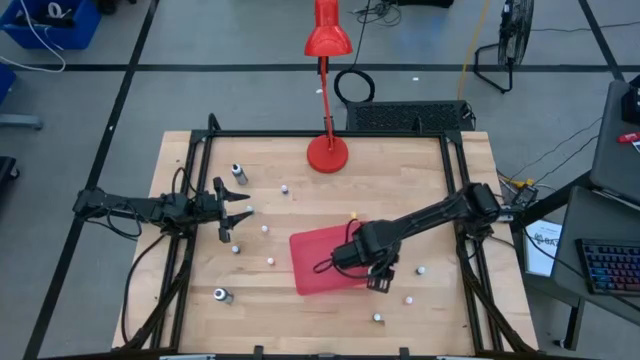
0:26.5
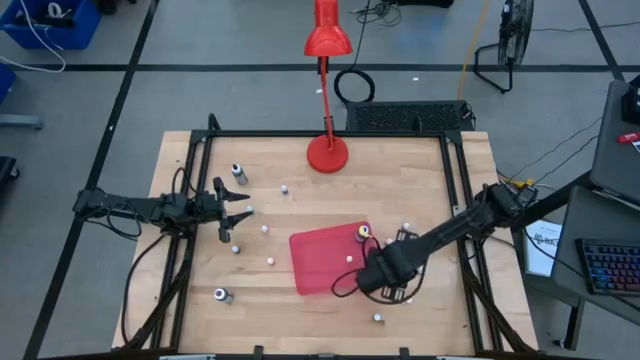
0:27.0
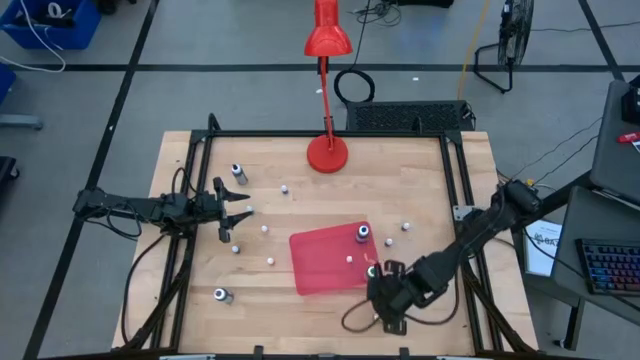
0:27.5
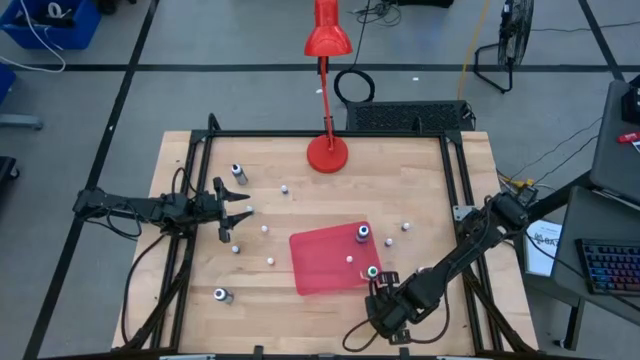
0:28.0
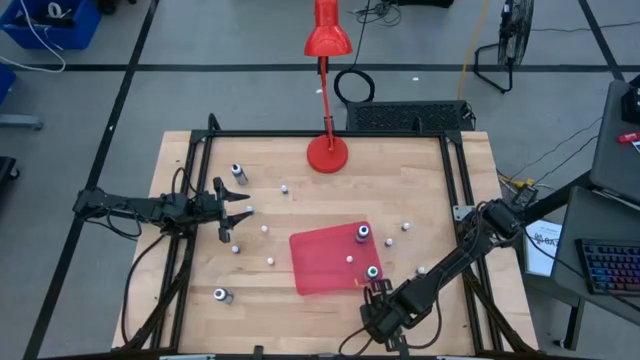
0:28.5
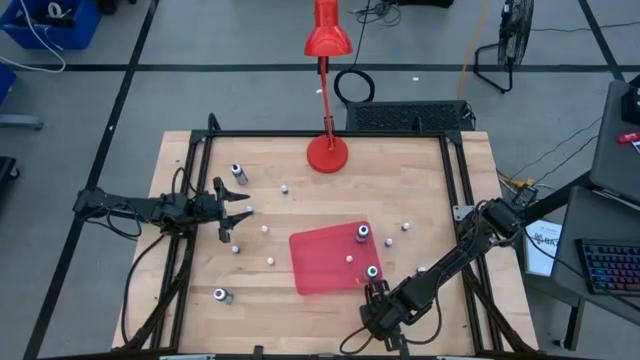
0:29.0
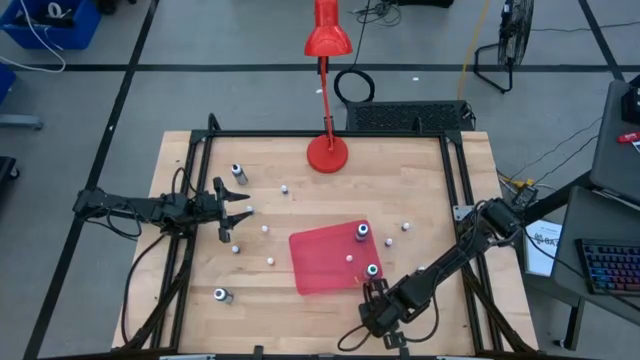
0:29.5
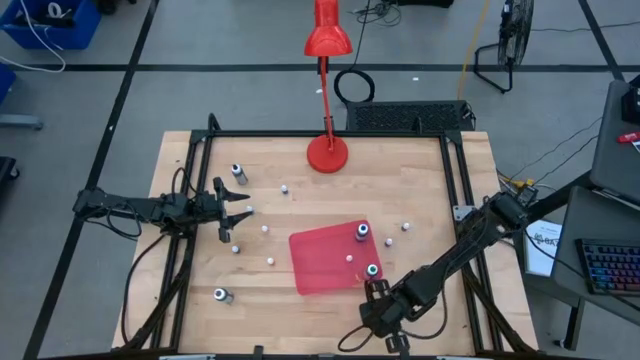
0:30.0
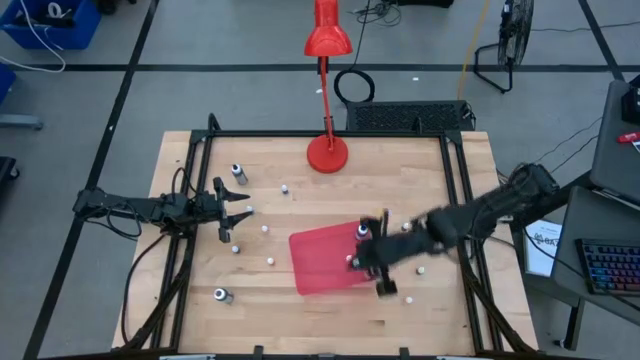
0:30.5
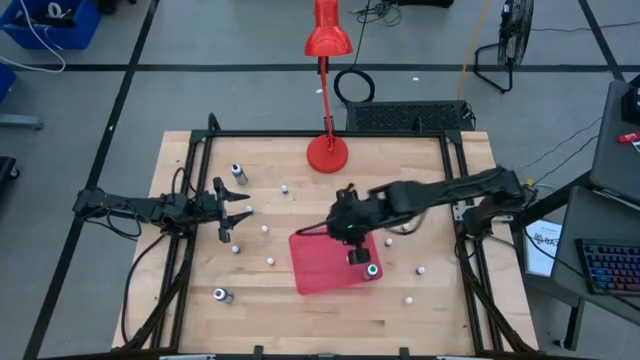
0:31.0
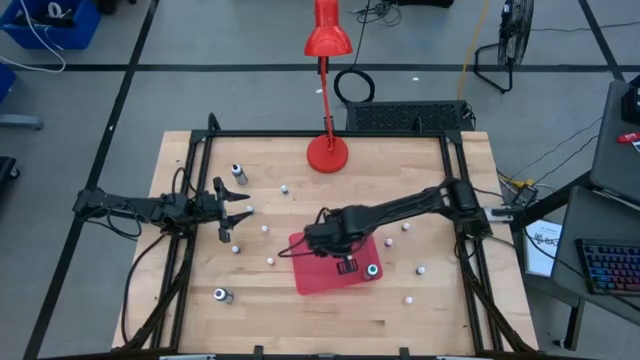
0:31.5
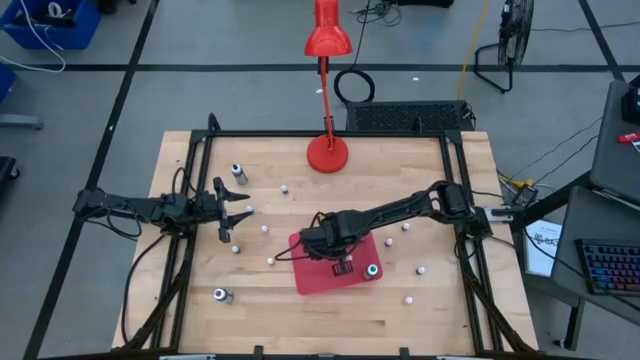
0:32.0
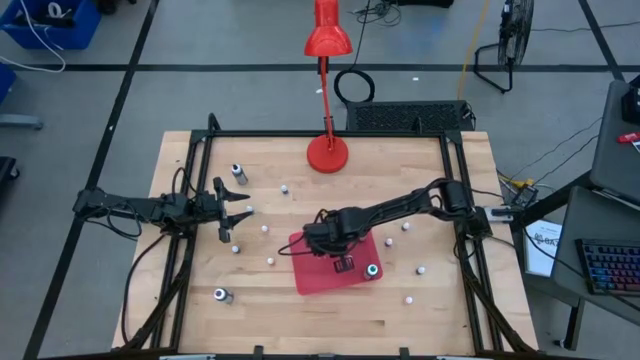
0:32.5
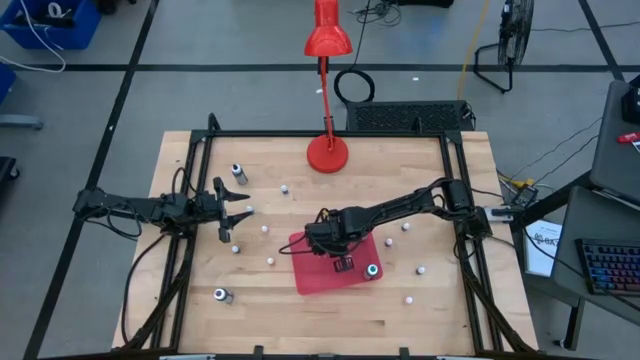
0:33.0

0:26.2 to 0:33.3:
Task: Pick & Place food coloring
Put the small blue food coloring bottle into the pink bin

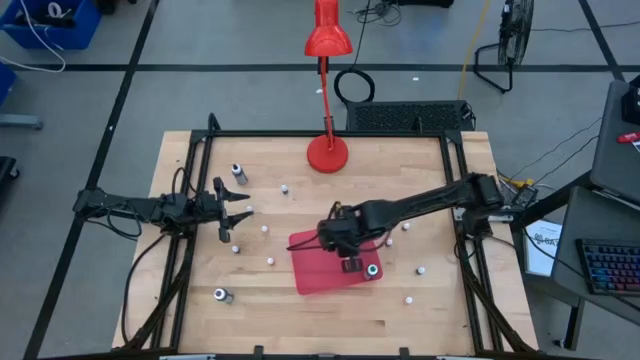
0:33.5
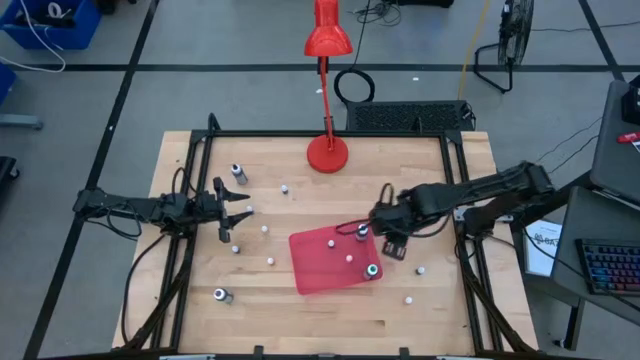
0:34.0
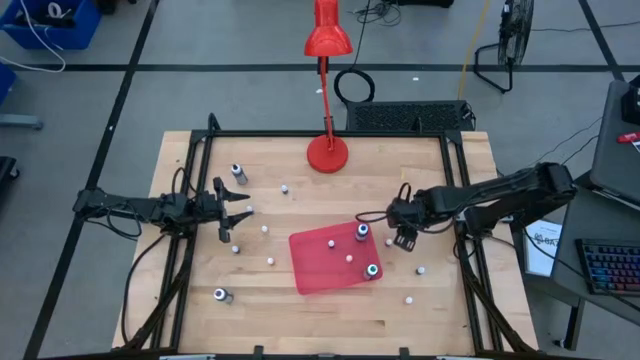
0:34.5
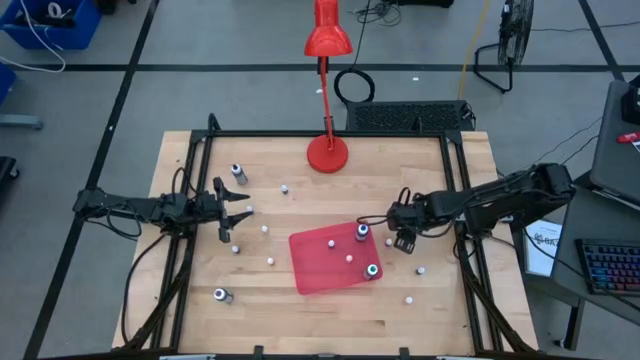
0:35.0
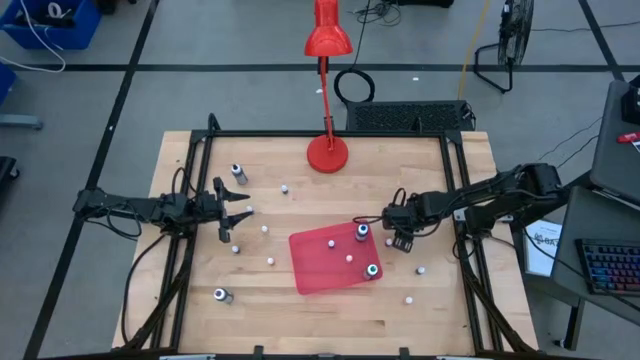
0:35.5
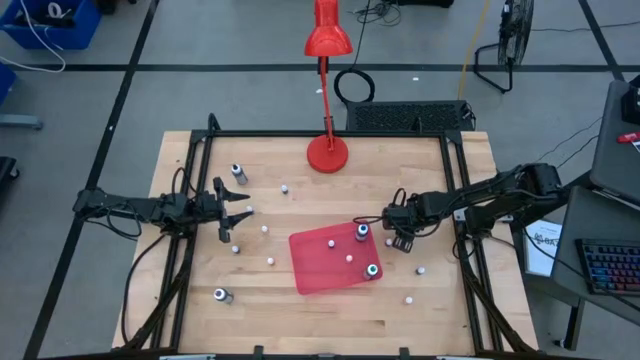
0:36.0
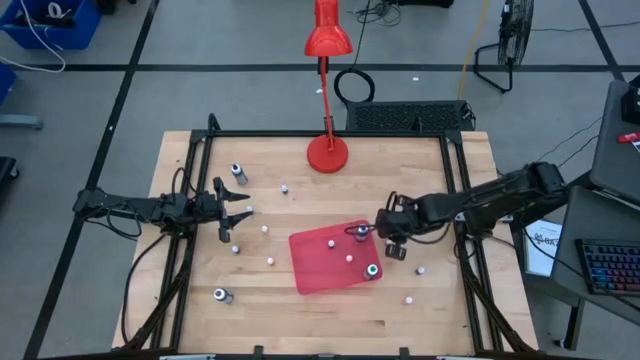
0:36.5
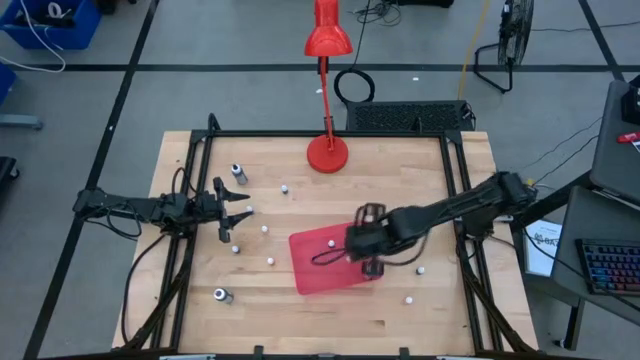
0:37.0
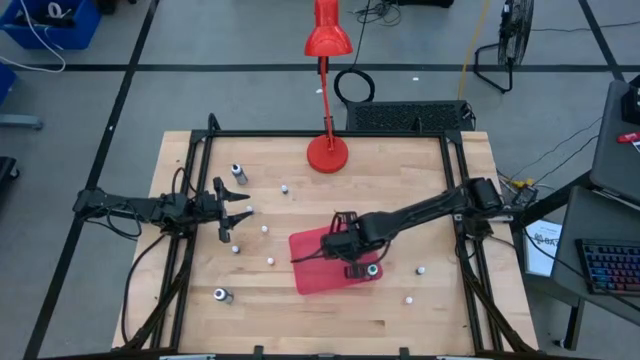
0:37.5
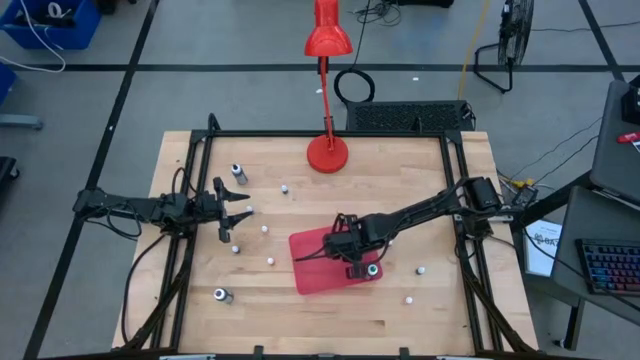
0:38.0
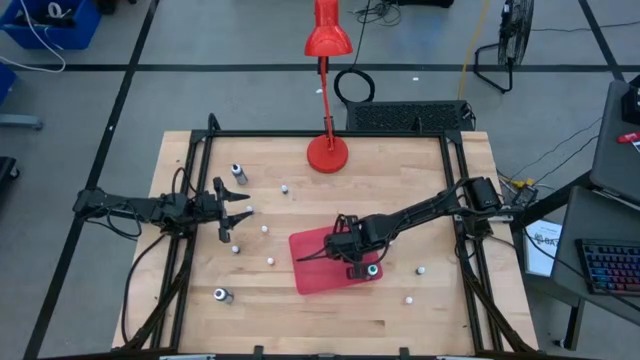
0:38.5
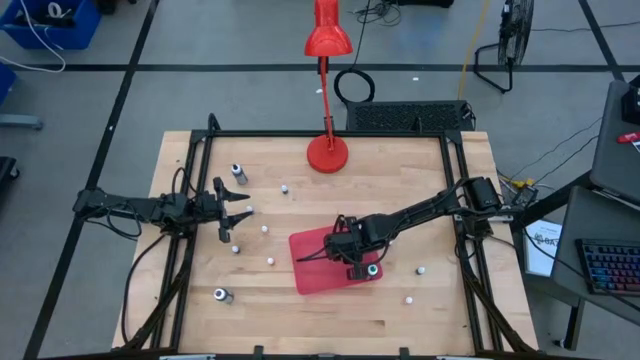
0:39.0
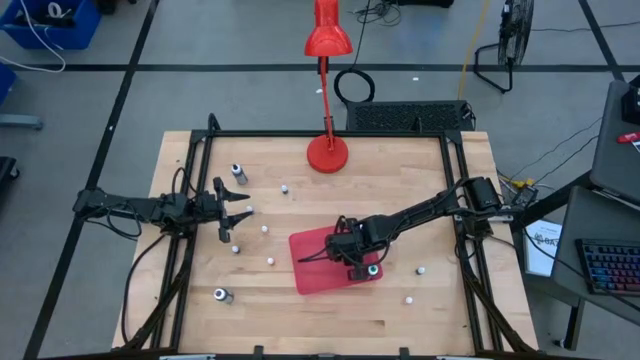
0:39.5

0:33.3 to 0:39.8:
Put the small purple food coloring bottle into the pink bin

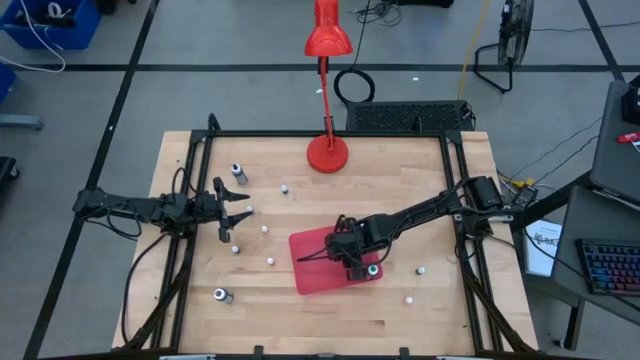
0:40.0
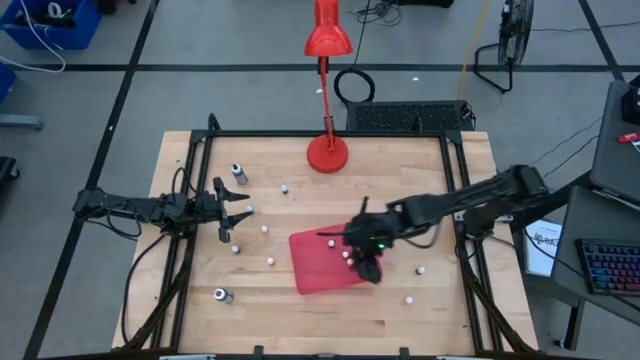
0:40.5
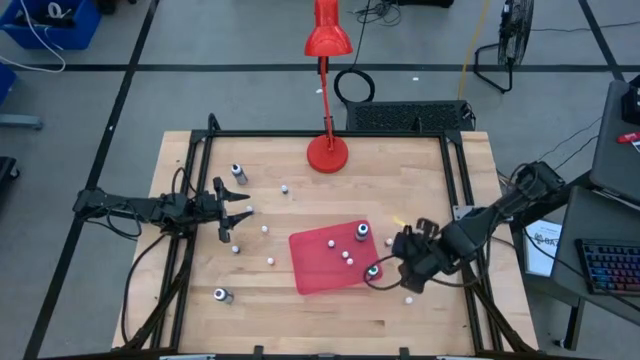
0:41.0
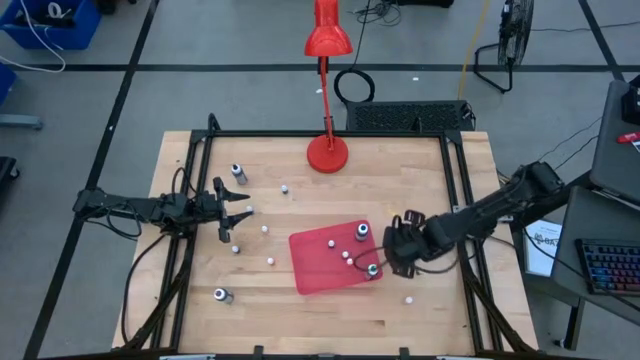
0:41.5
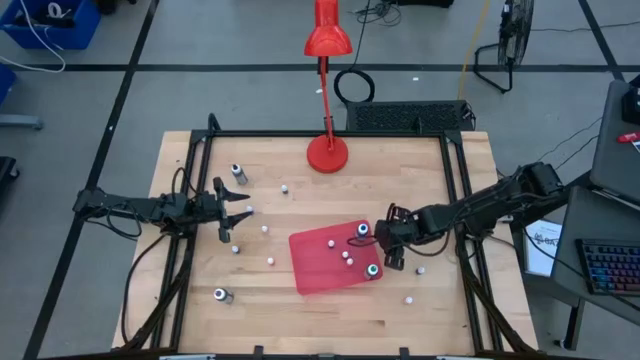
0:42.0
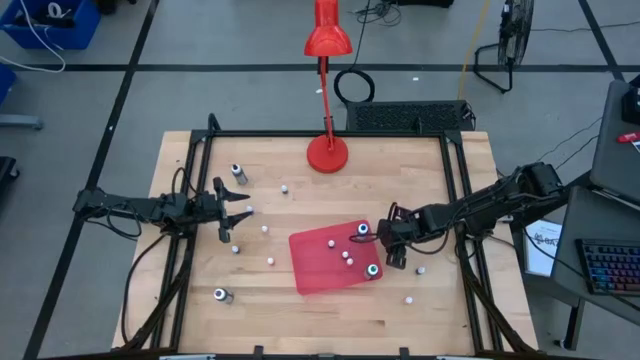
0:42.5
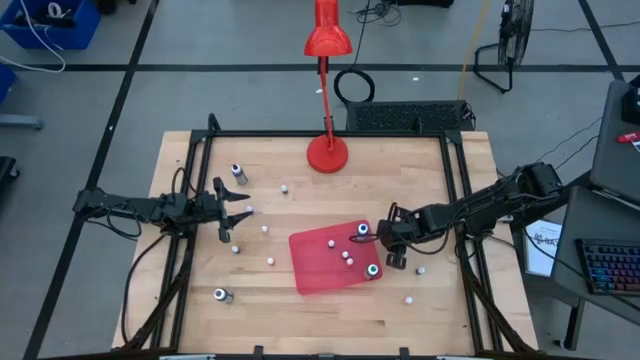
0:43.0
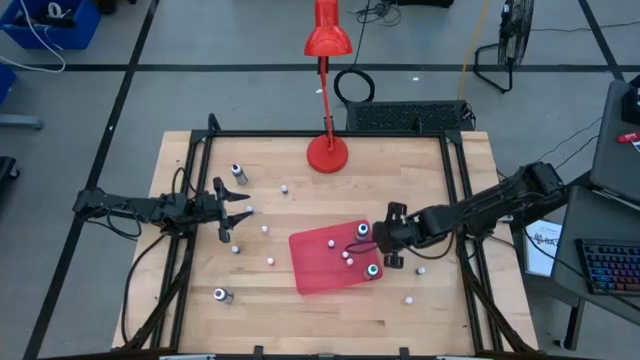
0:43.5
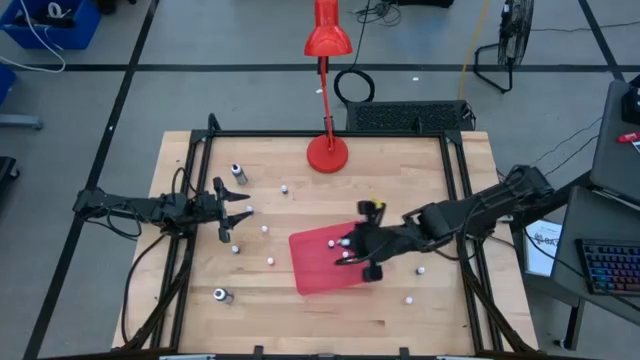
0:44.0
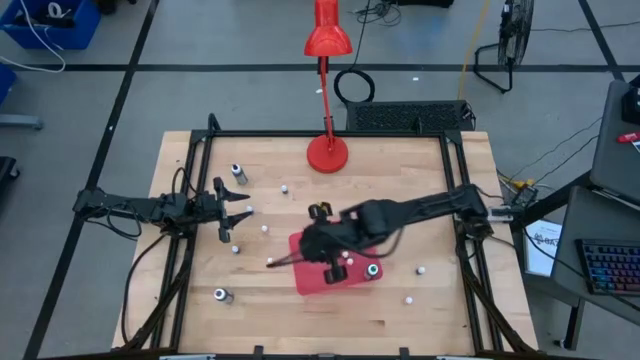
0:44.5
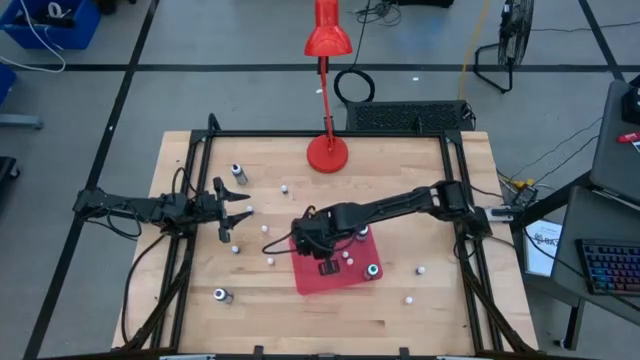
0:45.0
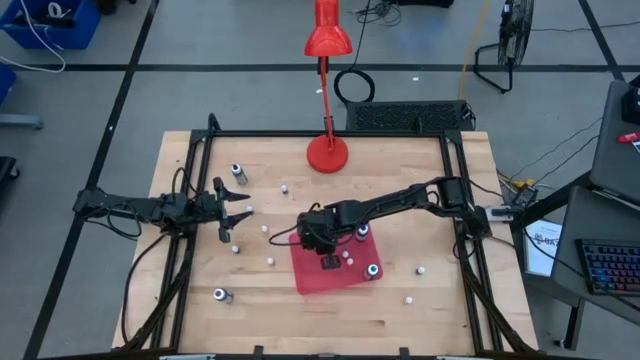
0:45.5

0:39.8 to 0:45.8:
Put the small red food coloring bottle into the pink bin

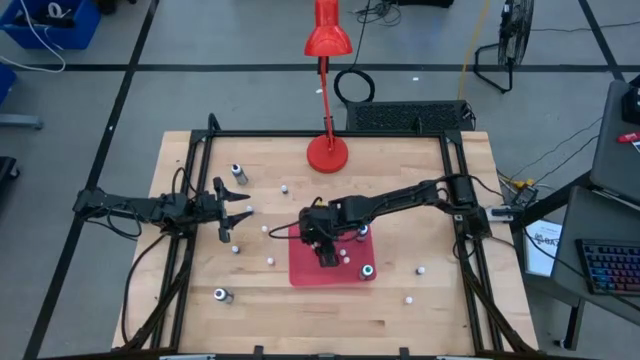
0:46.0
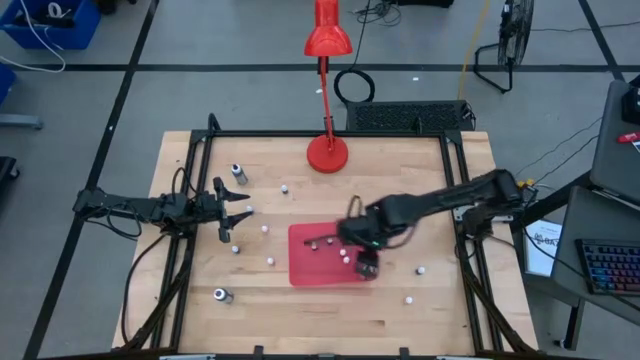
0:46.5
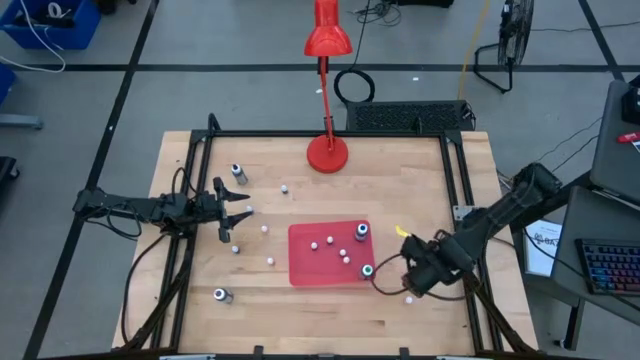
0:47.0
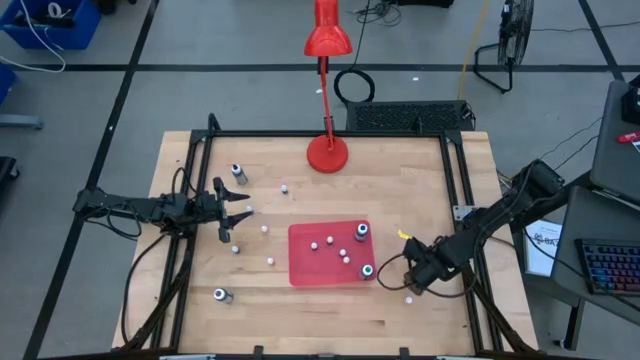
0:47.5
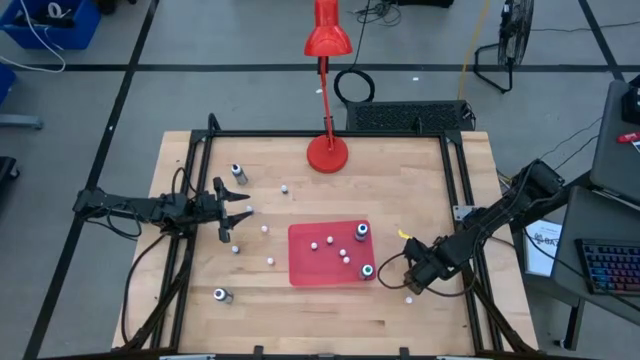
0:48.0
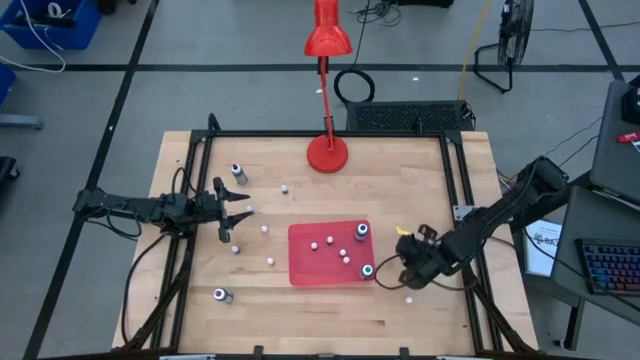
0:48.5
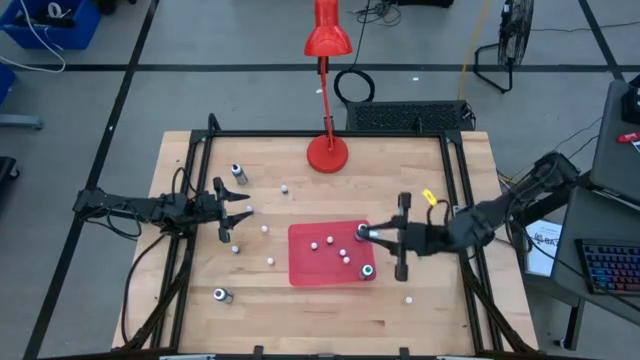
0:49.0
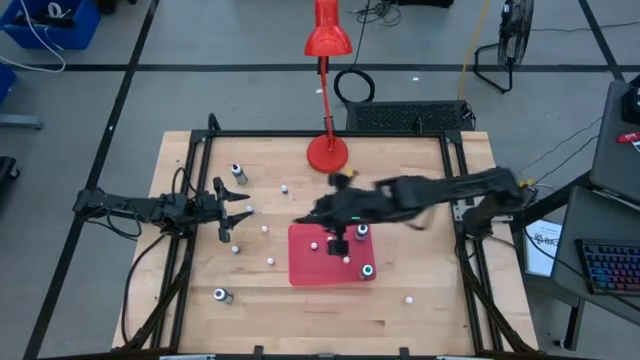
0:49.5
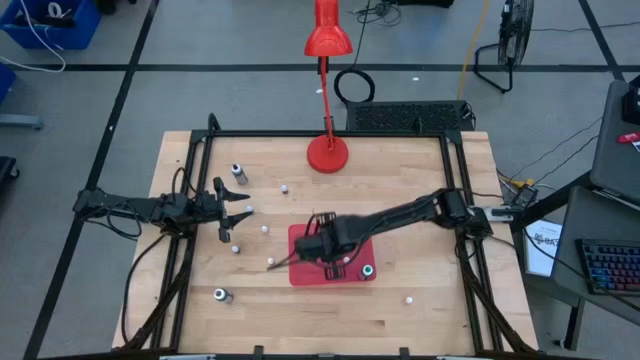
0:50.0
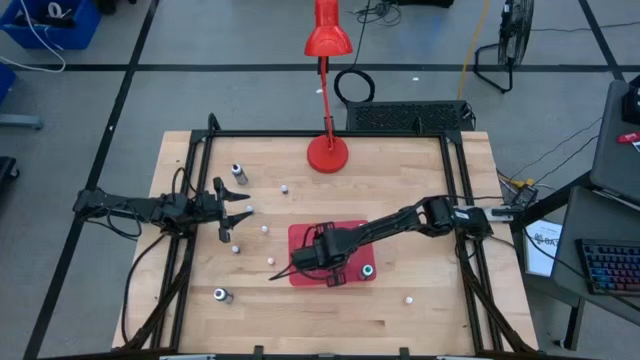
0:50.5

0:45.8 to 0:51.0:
Put the small purple food coloring bottle into the pink bin
